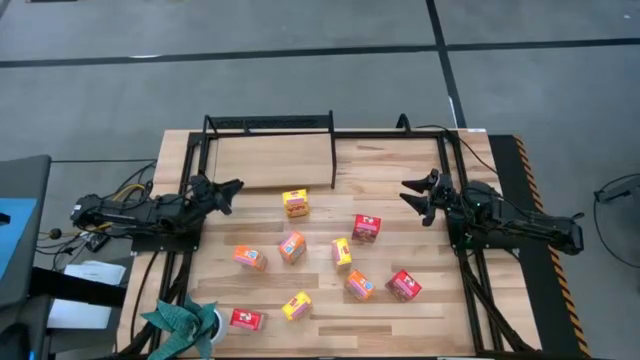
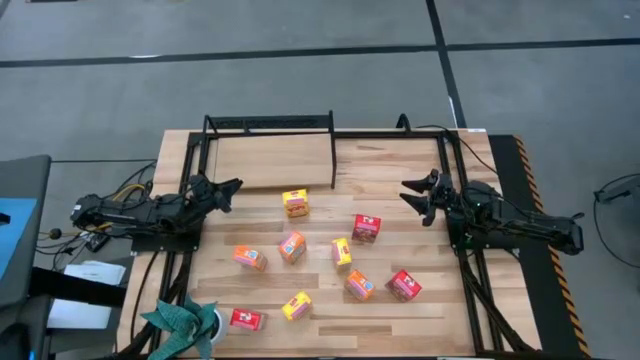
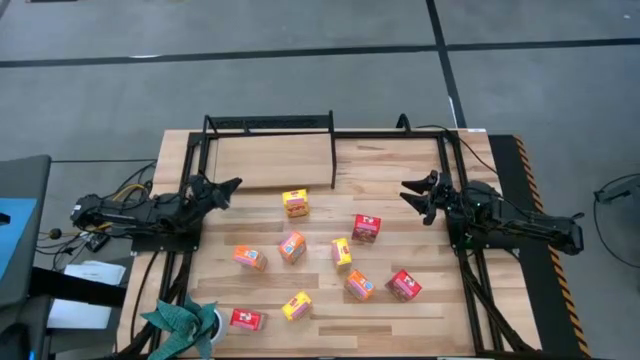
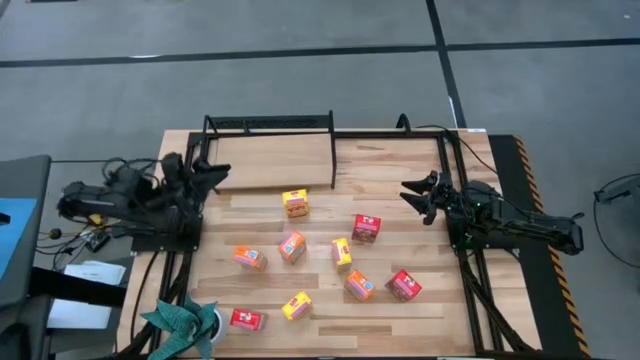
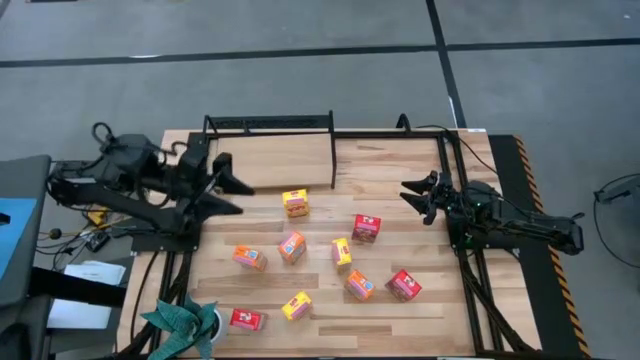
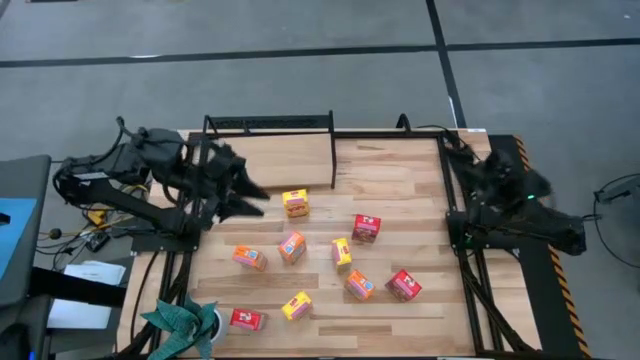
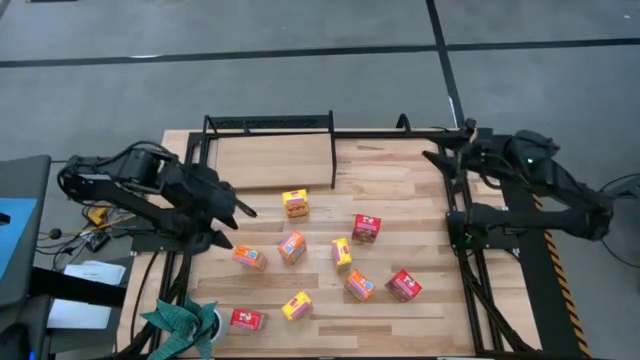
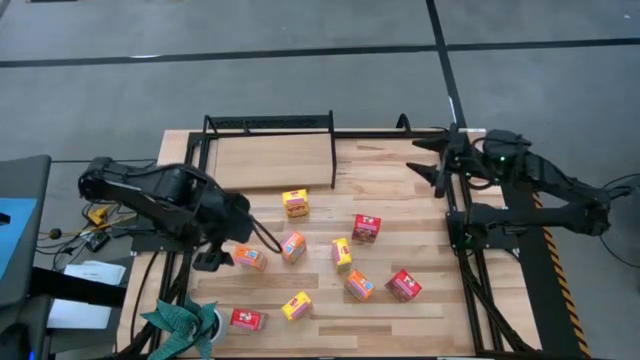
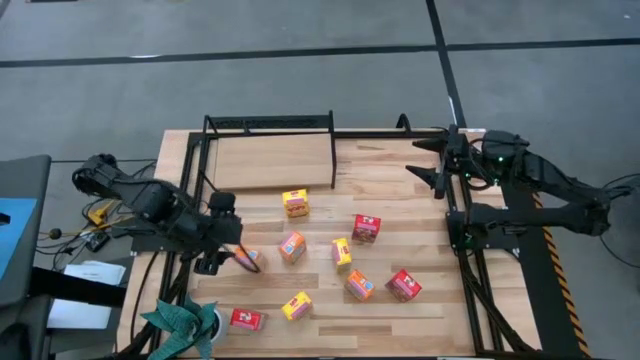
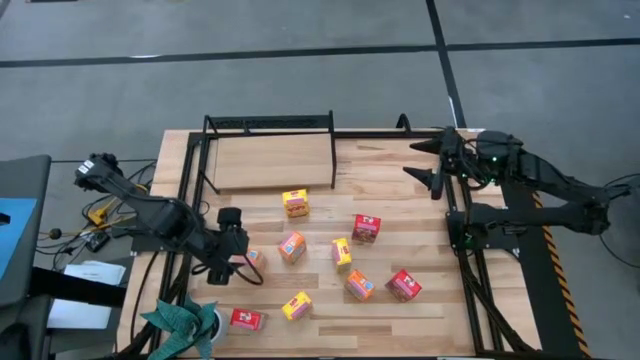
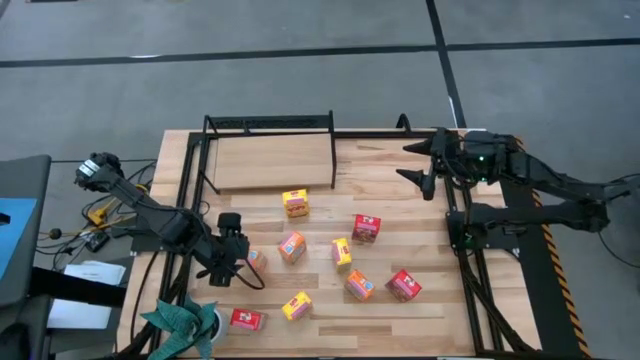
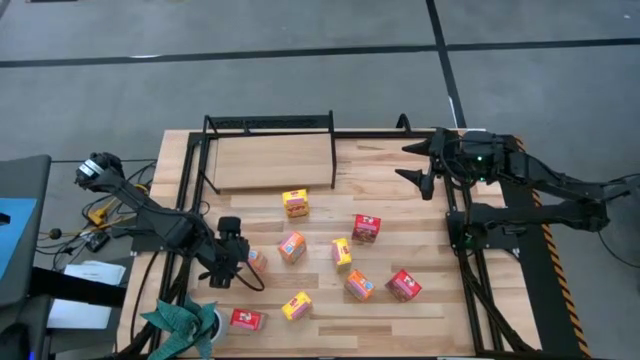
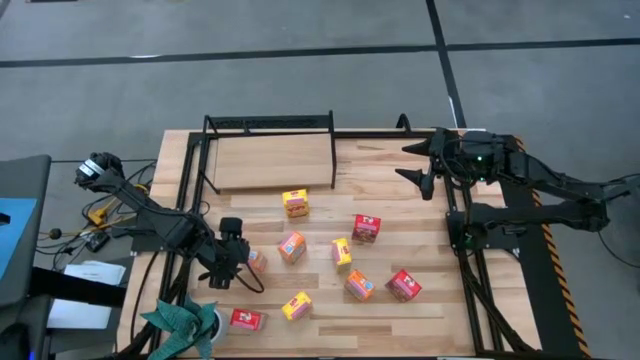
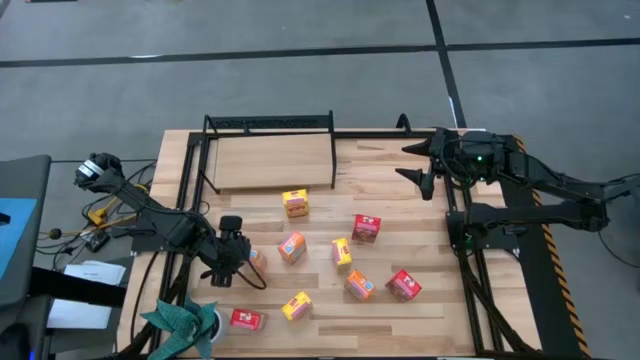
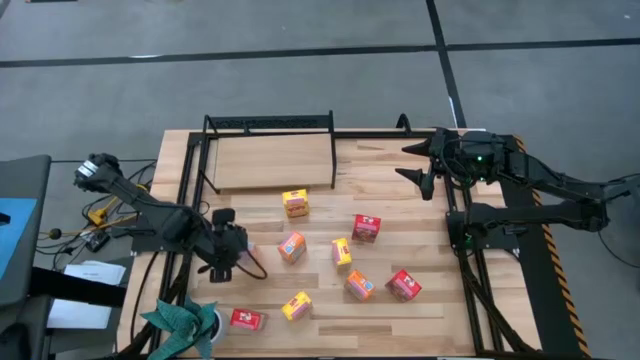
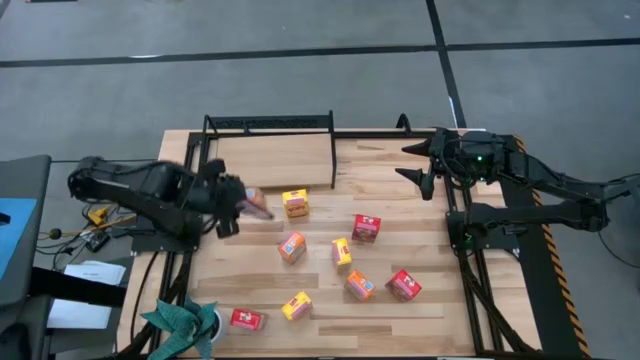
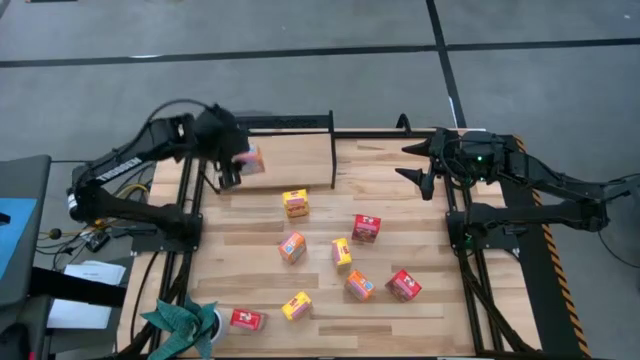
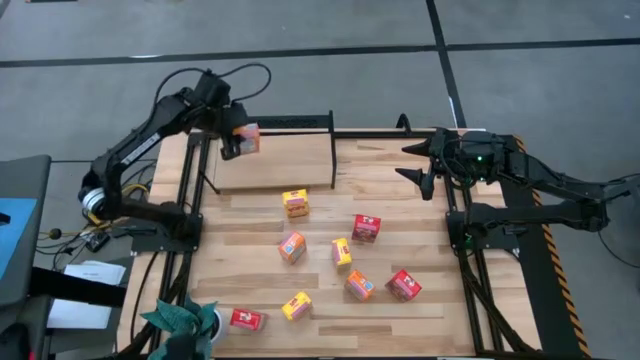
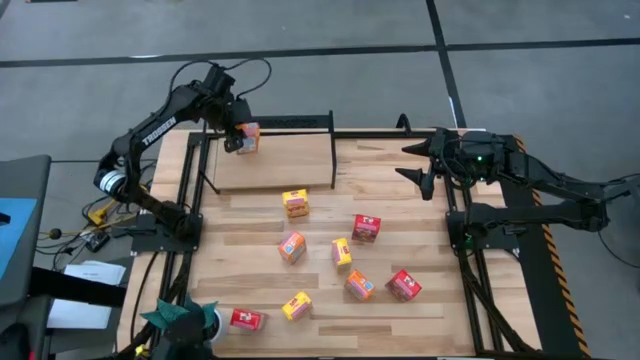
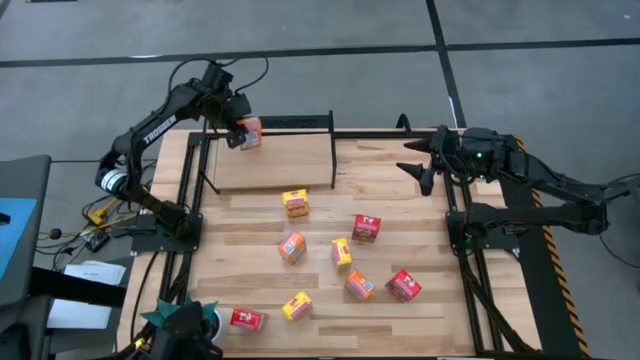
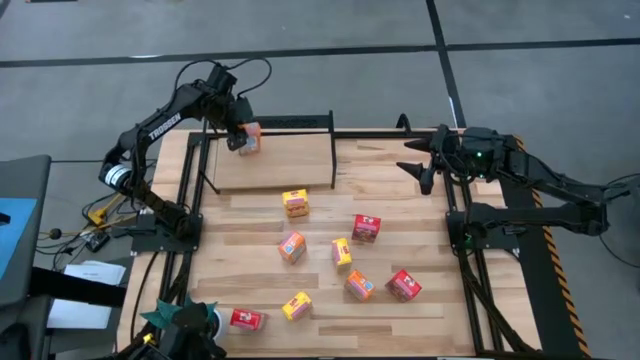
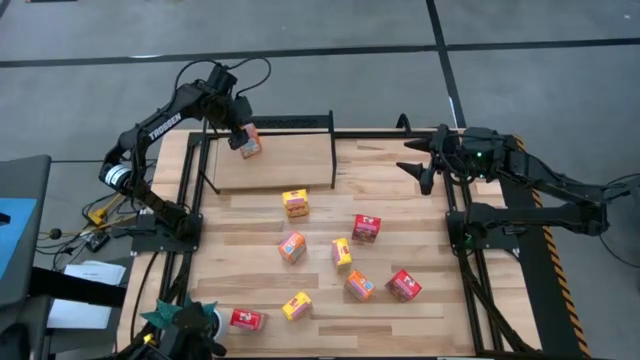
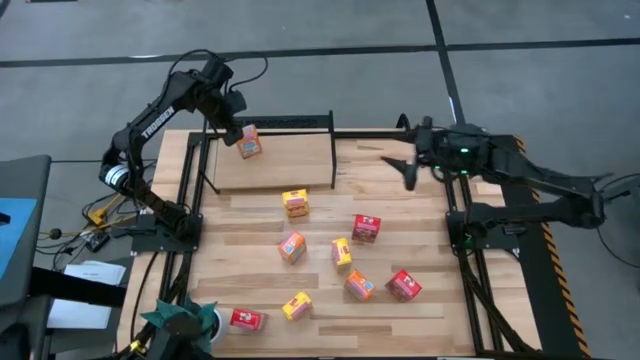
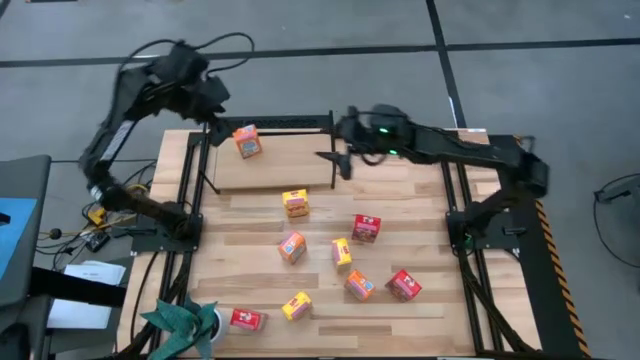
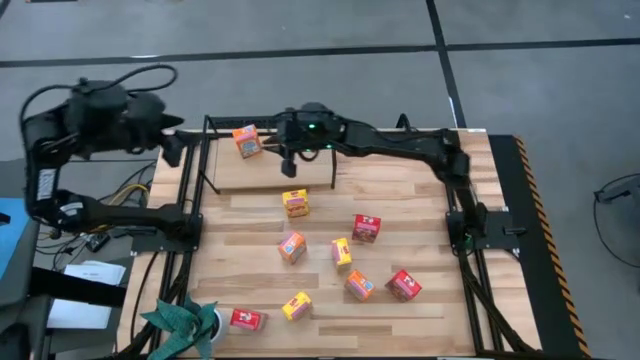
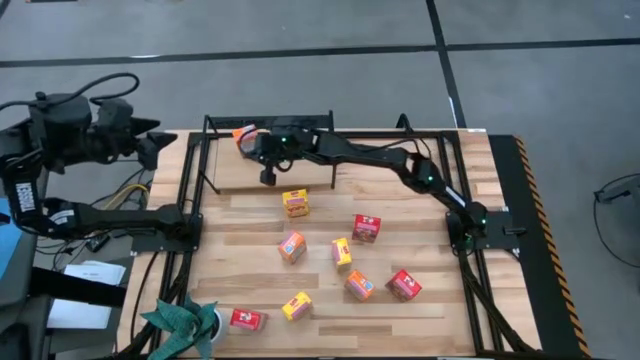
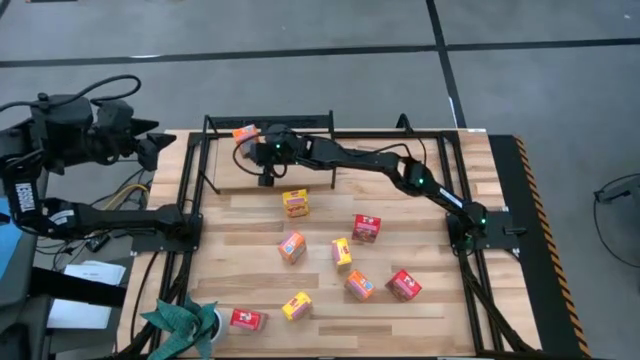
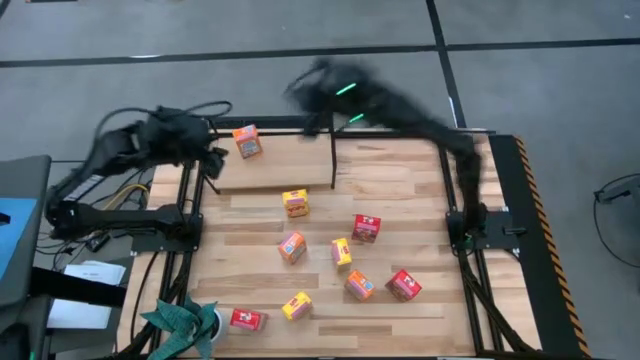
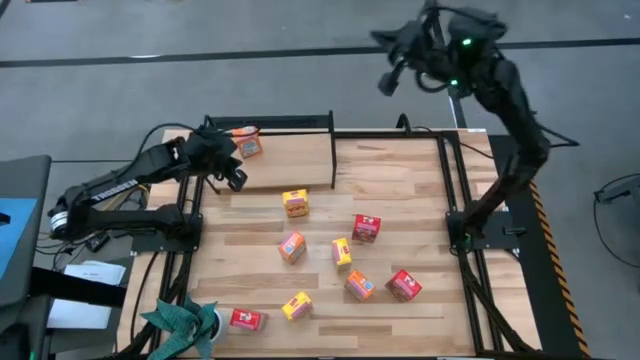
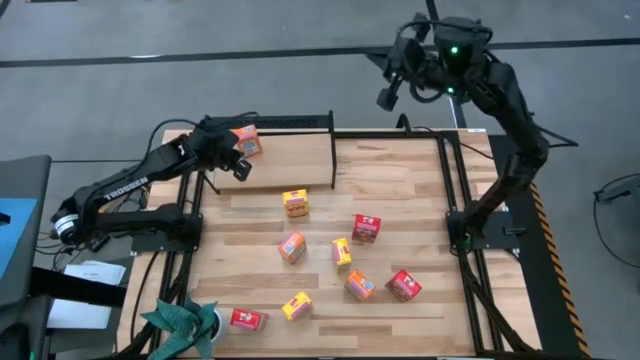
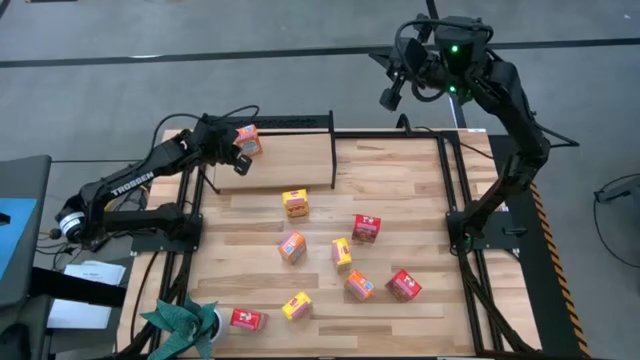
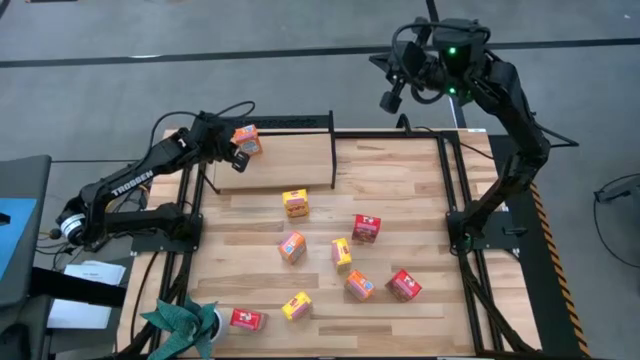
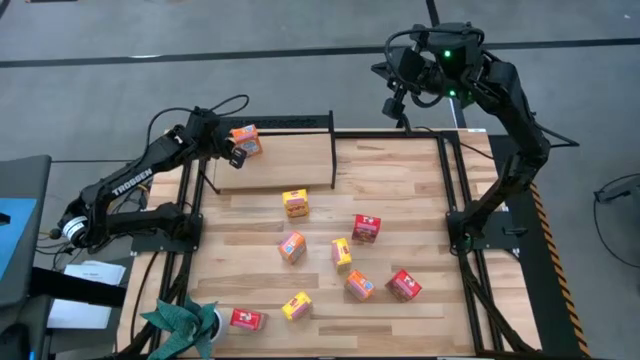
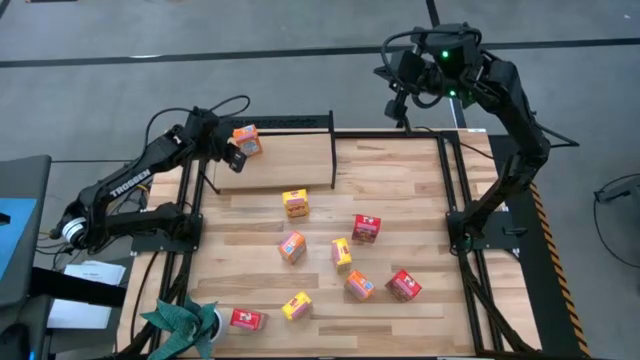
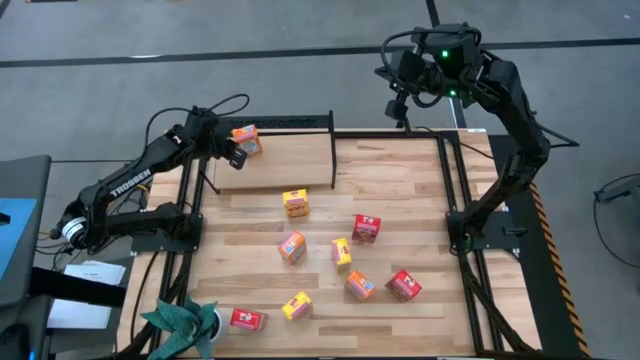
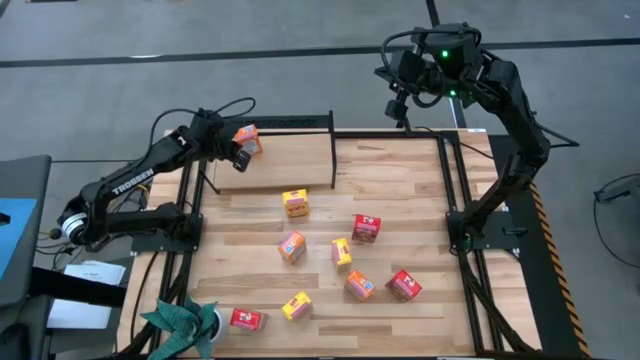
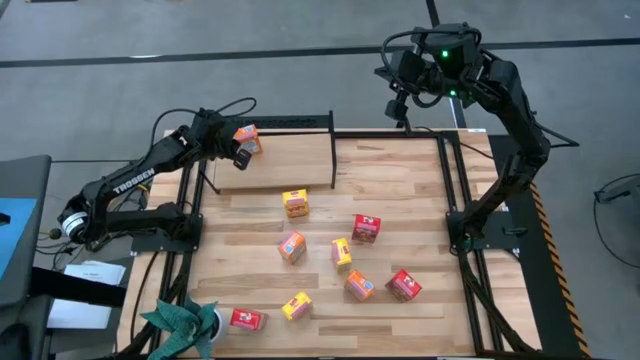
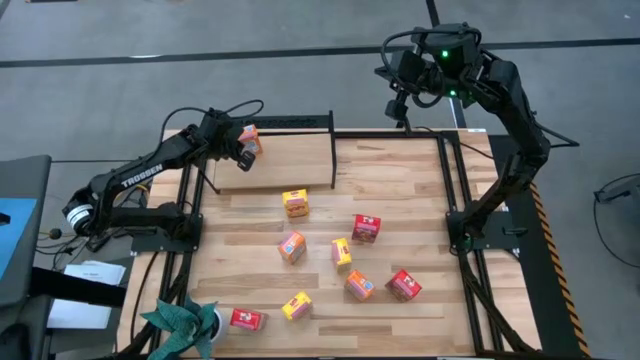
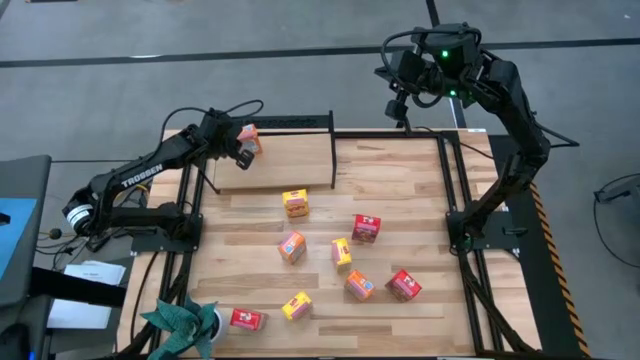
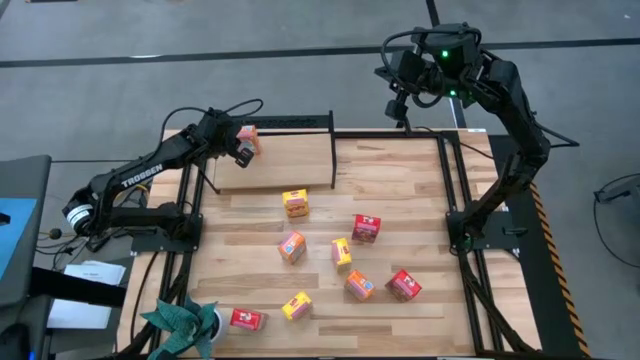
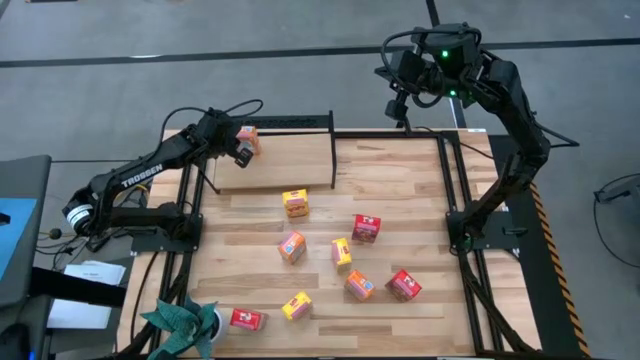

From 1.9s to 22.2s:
Task: Stack cereal on shelf
Put the top left orange cereal box on the shelf
